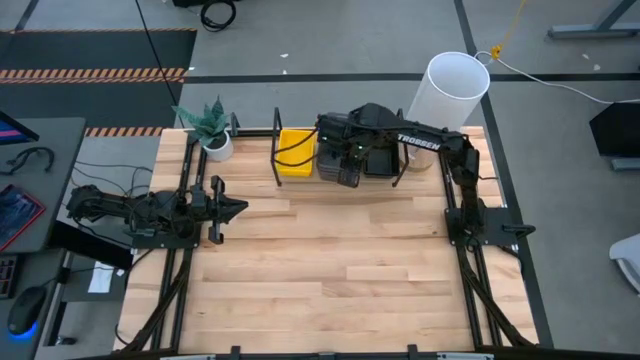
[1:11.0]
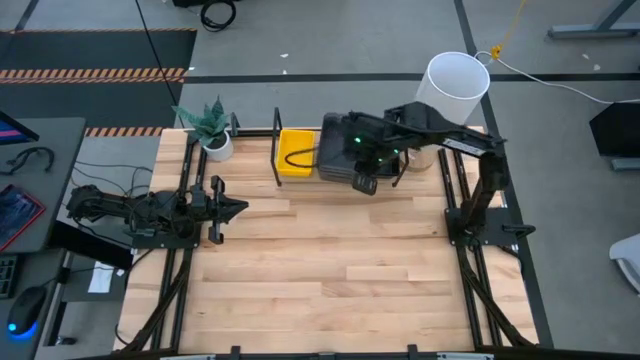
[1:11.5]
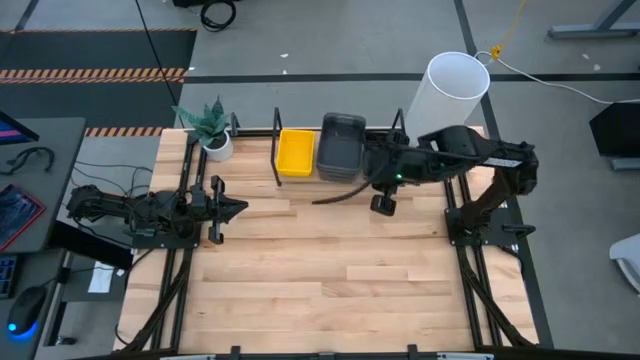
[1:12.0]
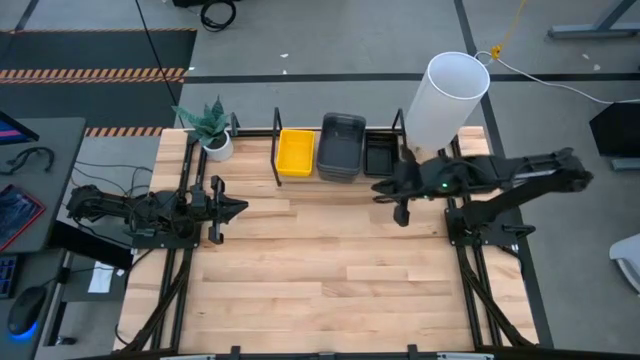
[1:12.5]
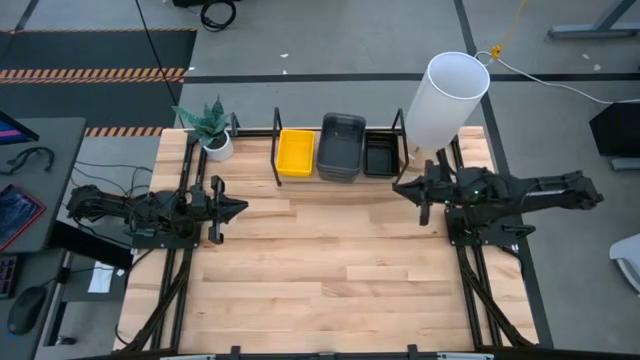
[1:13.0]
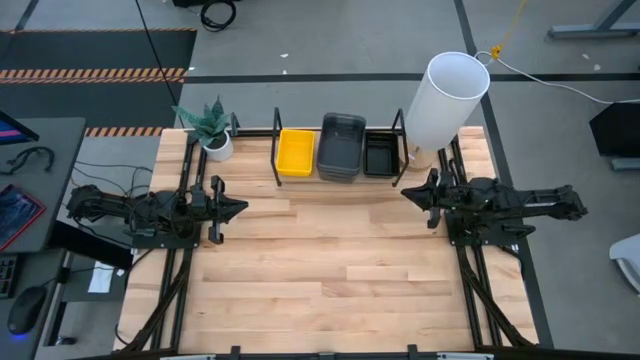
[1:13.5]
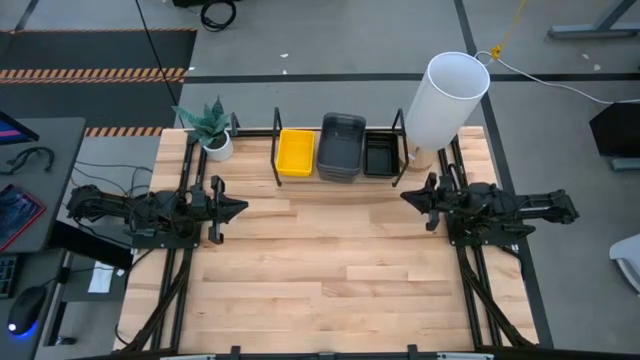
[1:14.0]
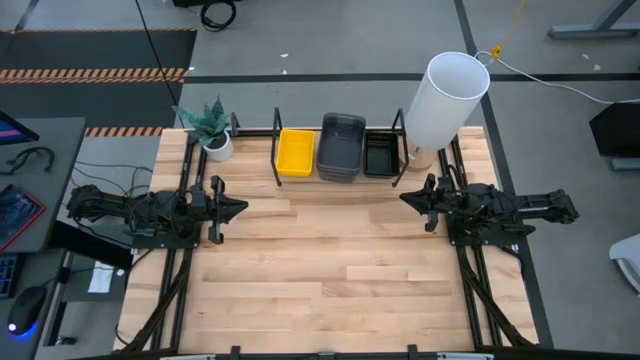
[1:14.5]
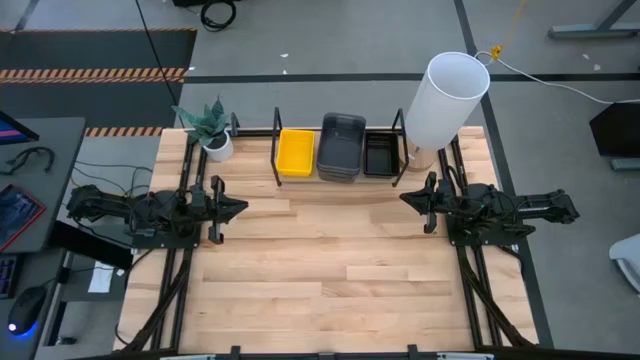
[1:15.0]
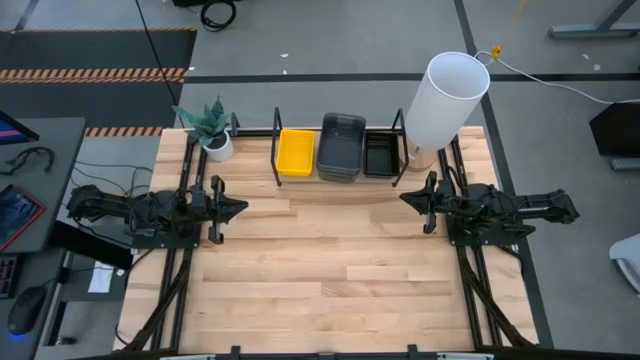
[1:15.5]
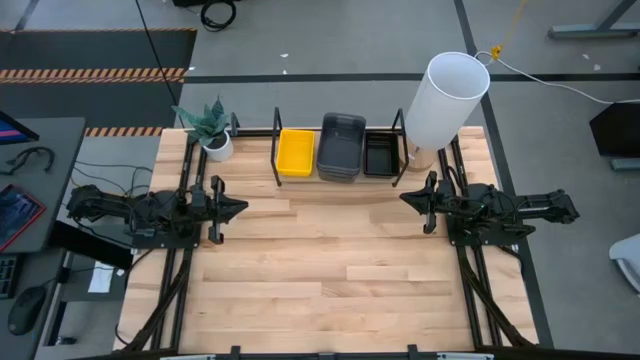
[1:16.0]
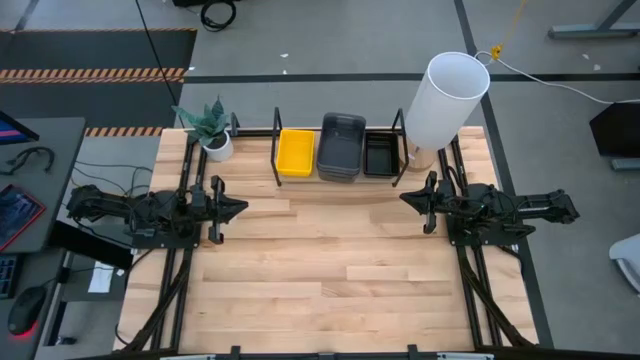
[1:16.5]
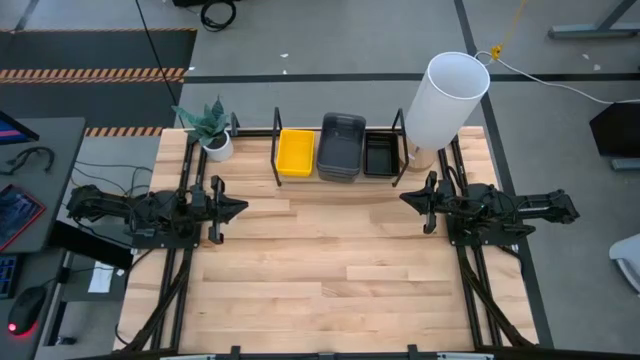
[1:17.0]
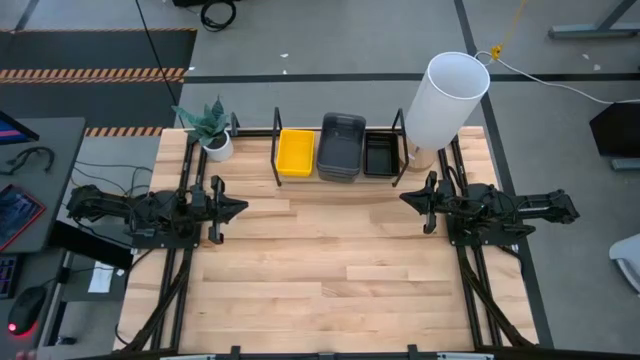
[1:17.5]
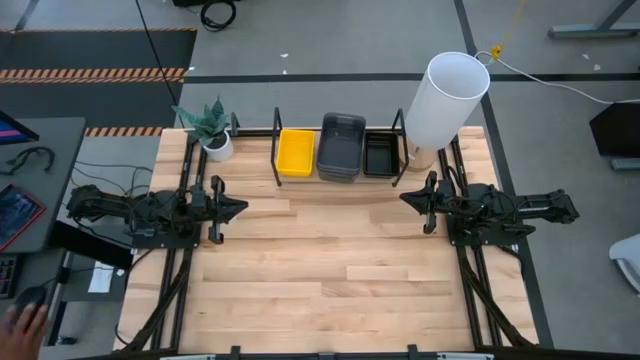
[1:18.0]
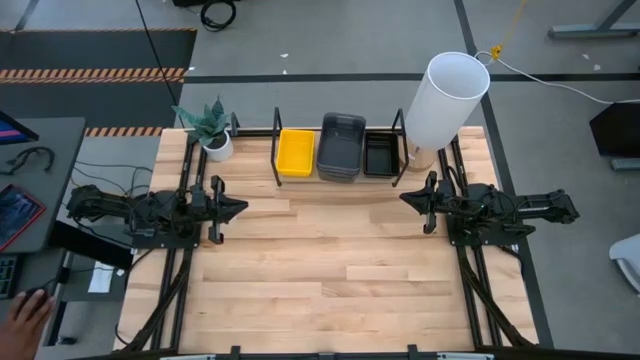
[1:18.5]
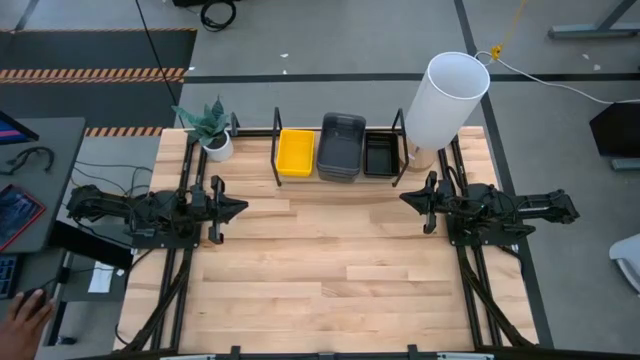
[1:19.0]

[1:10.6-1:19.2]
Task: Stack baskets on shelf by color
Return to Home Position

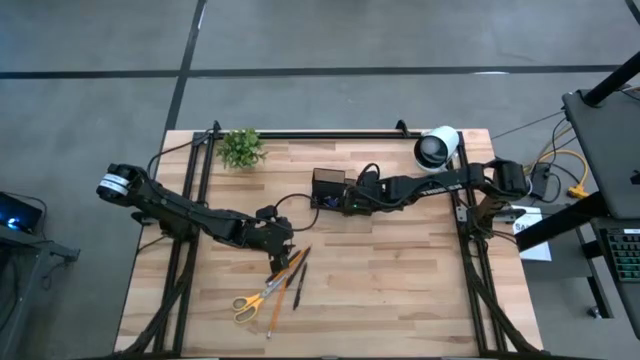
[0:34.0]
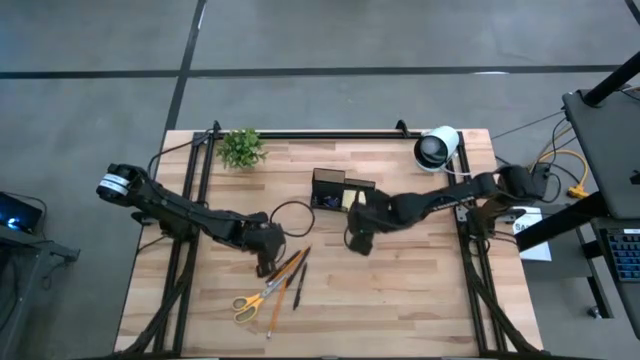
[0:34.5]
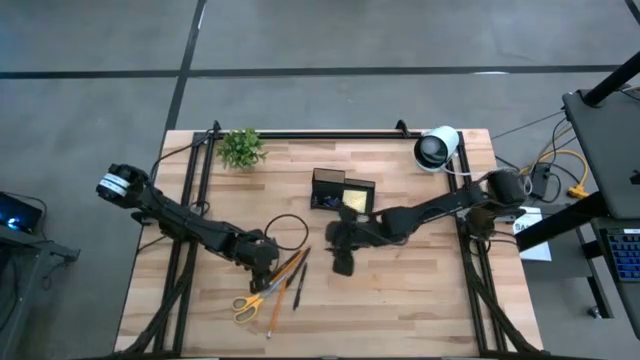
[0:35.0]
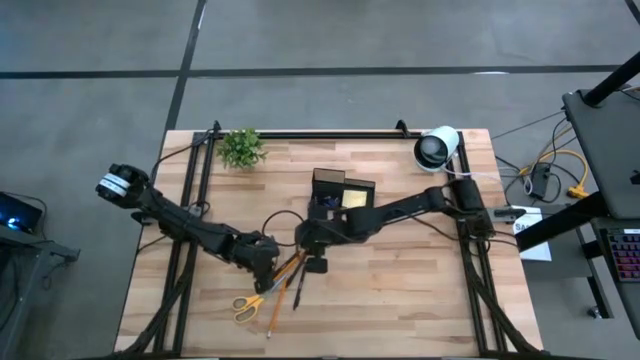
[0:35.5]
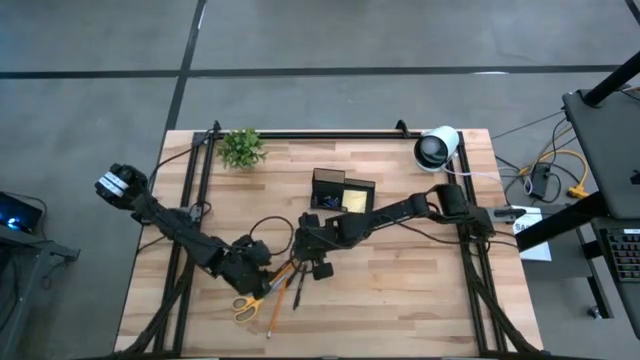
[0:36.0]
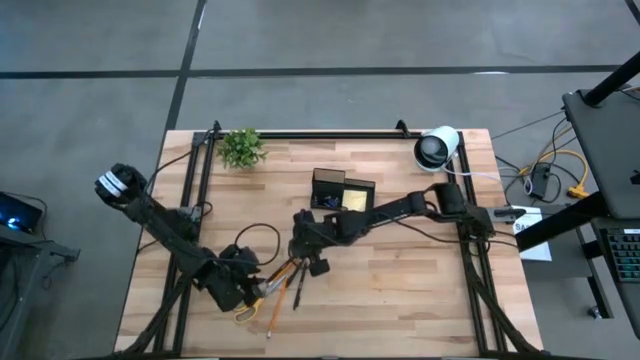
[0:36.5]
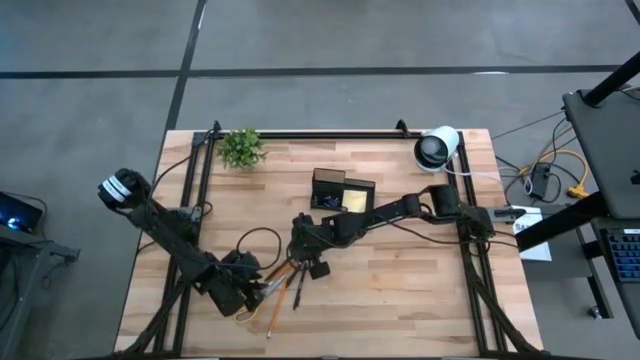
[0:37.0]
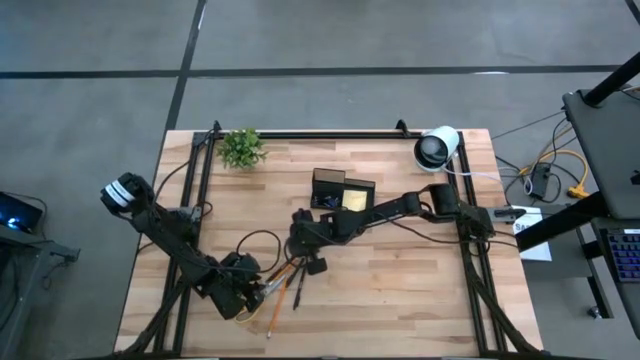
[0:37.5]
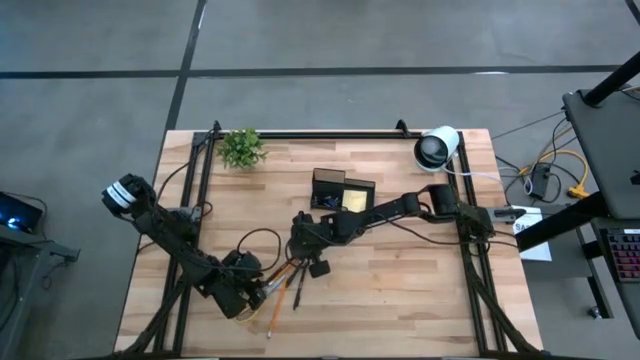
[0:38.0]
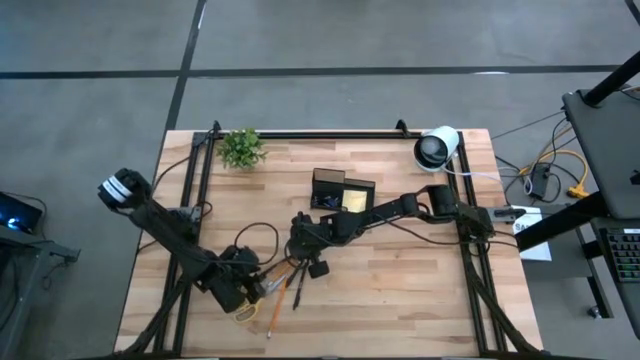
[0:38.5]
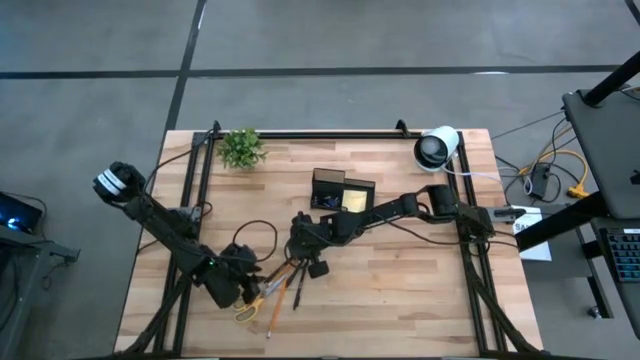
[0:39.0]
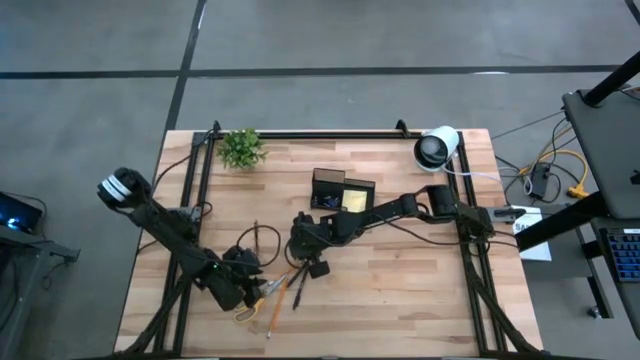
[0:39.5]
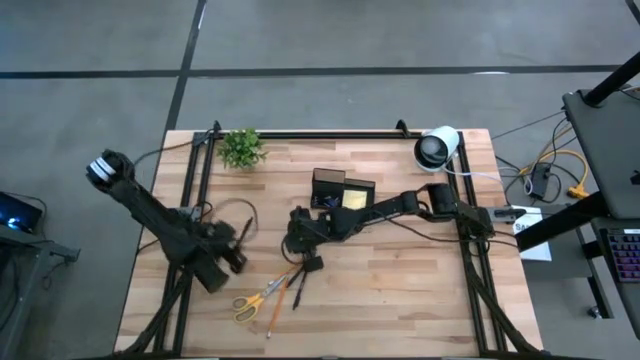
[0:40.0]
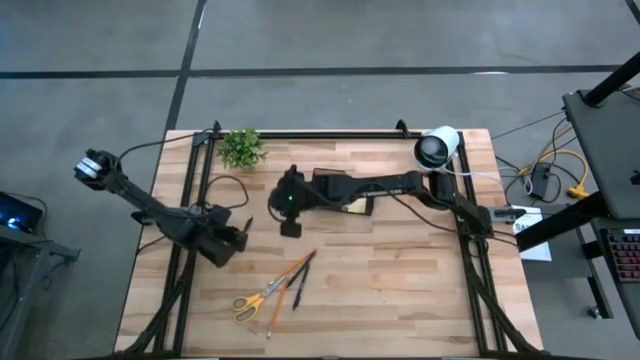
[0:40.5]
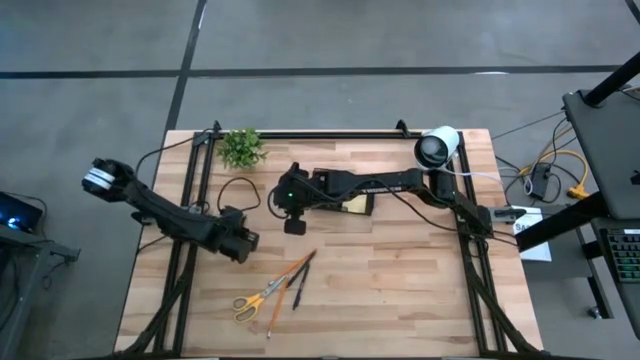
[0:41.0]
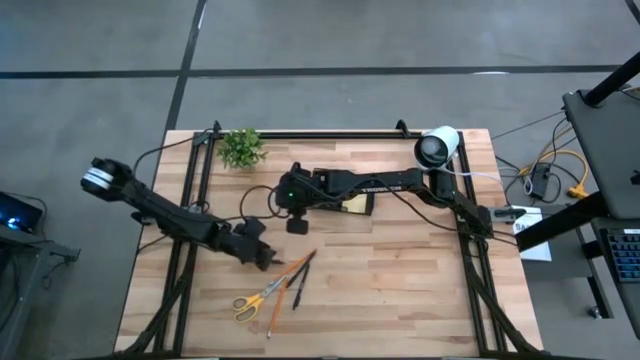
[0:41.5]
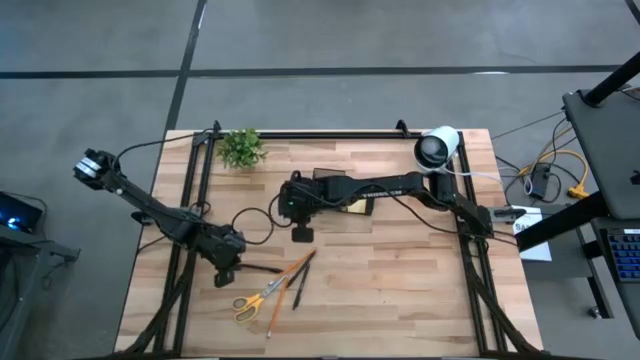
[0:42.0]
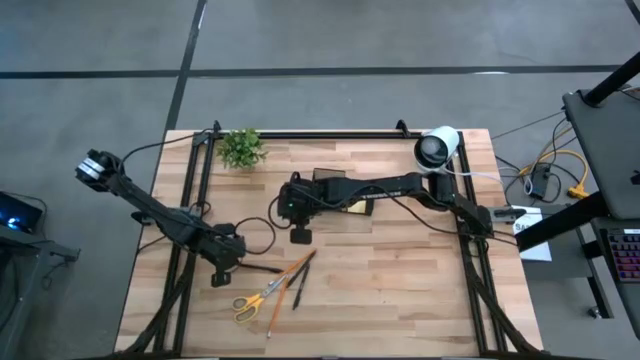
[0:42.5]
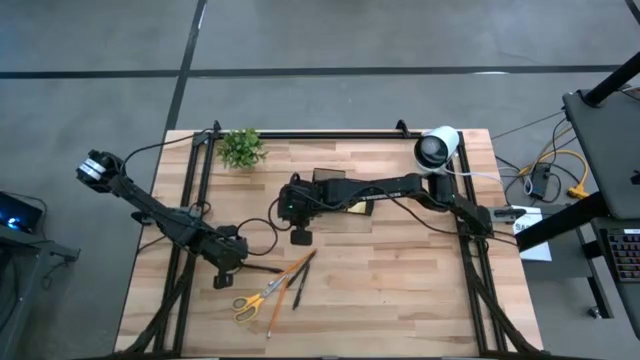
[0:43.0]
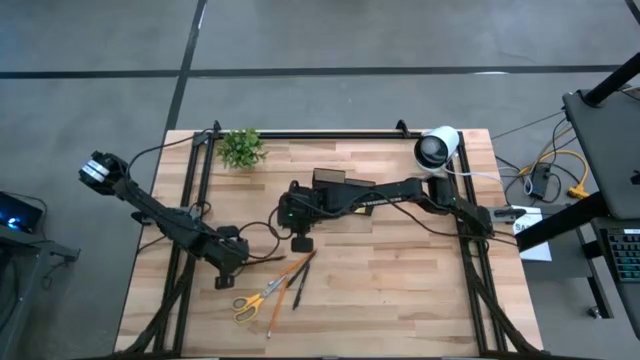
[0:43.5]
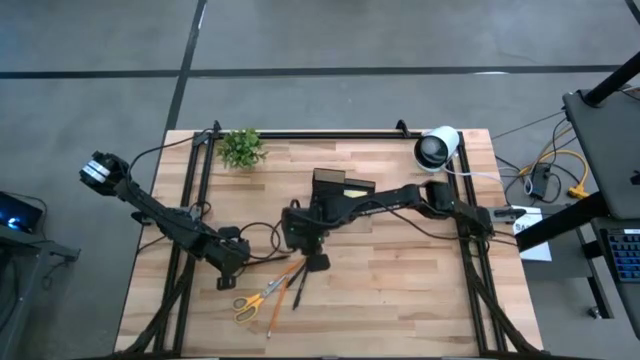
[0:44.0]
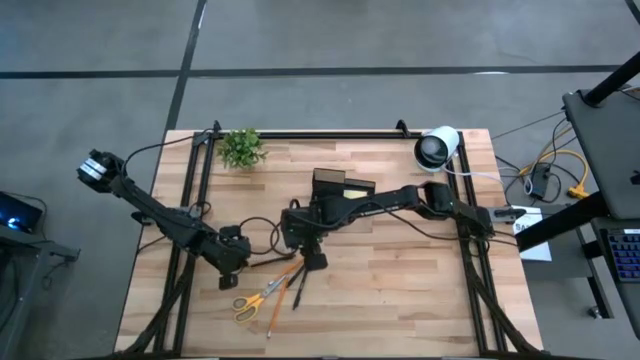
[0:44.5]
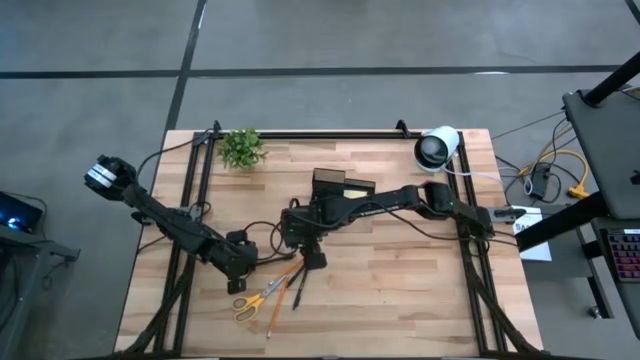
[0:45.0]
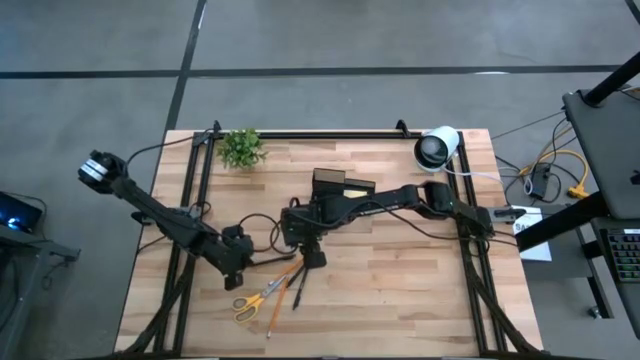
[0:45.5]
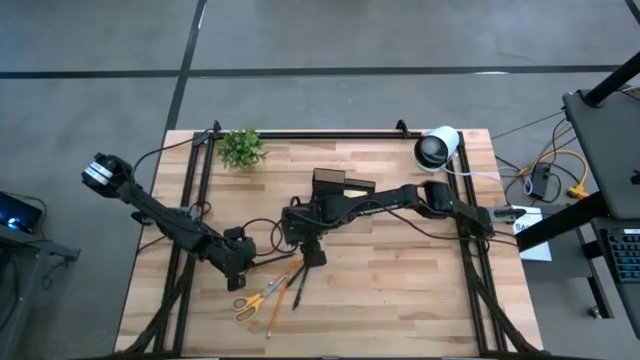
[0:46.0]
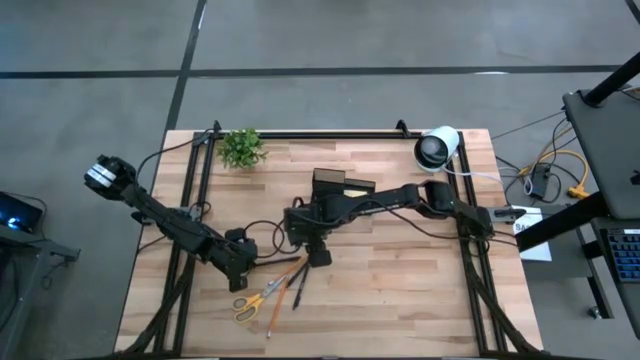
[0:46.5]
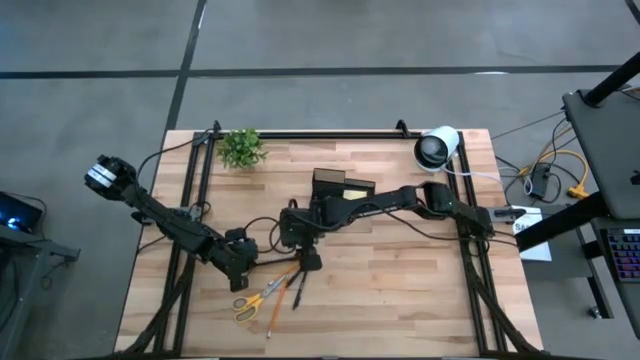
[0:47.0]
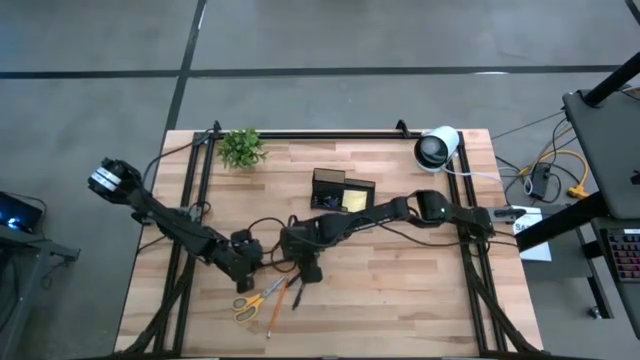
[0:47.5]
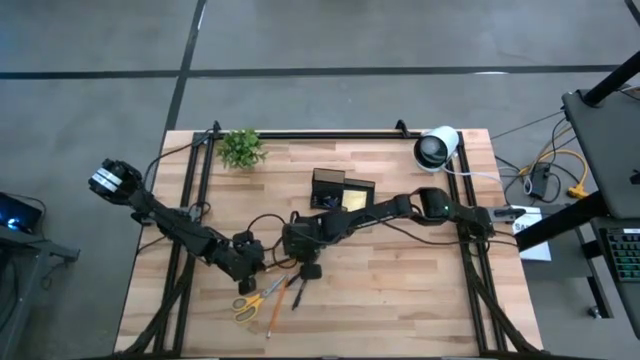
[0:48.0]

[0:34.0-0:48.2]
Task: Pick and place office supplies into organizer
Put the top left black pen into the black desk organizer
